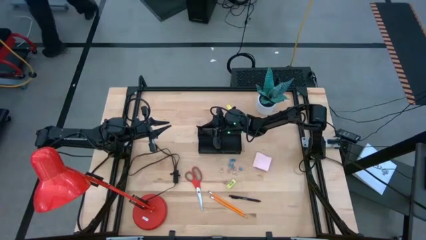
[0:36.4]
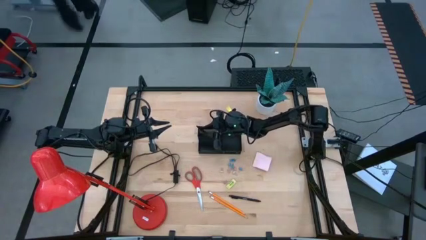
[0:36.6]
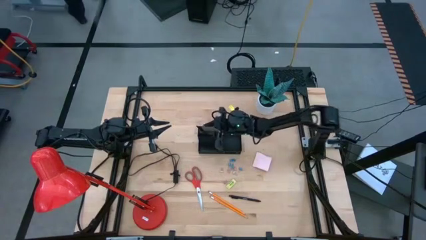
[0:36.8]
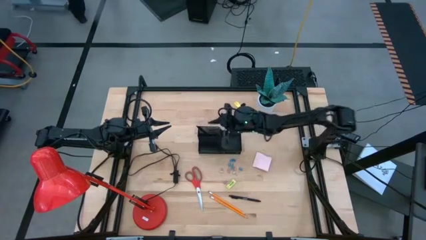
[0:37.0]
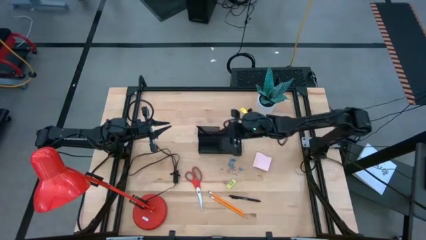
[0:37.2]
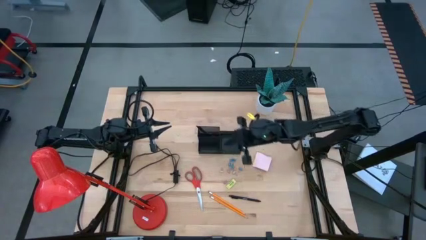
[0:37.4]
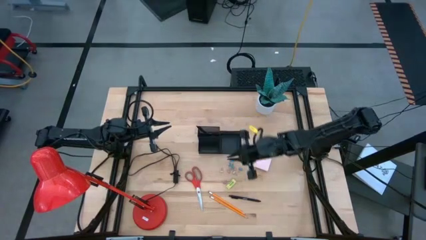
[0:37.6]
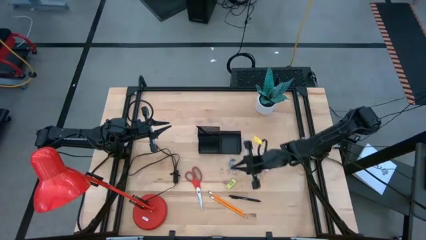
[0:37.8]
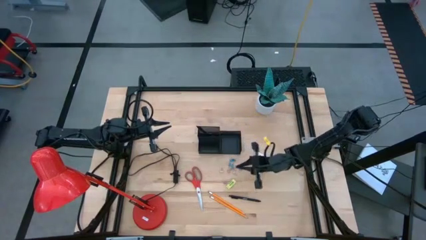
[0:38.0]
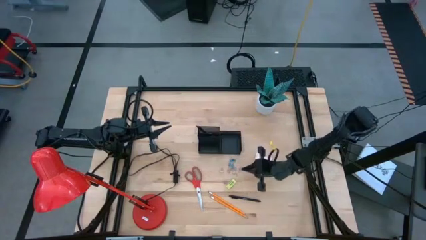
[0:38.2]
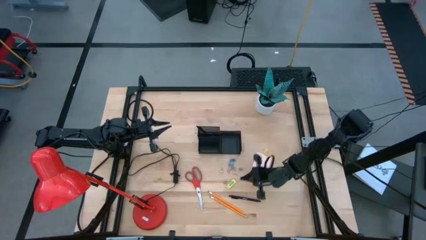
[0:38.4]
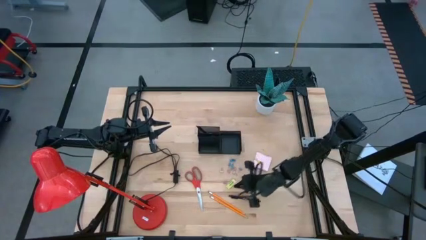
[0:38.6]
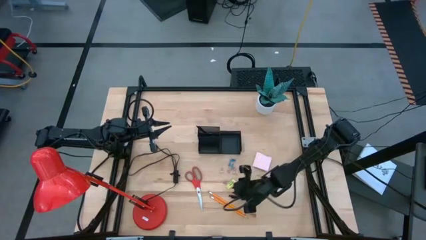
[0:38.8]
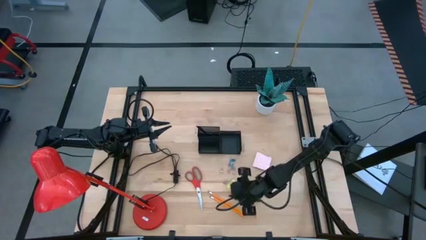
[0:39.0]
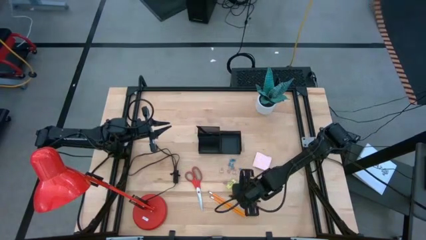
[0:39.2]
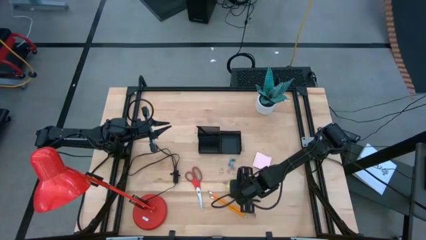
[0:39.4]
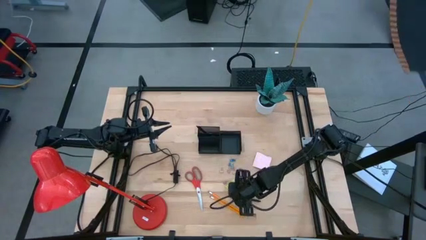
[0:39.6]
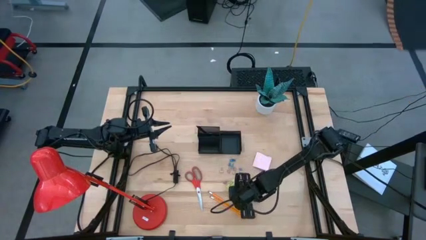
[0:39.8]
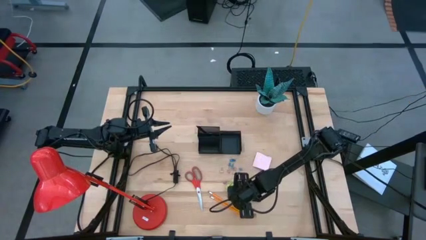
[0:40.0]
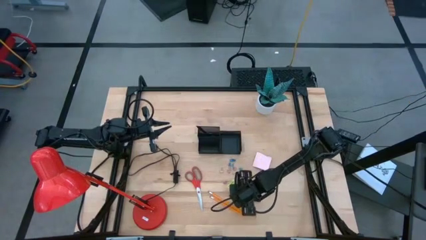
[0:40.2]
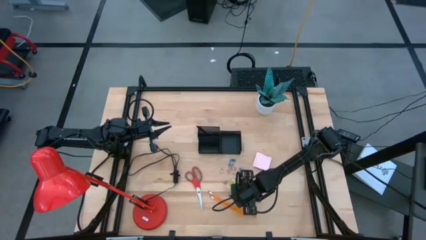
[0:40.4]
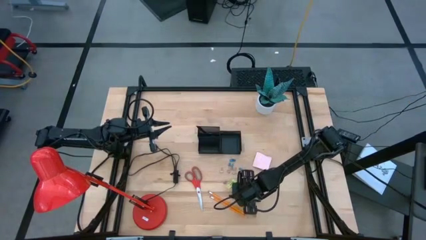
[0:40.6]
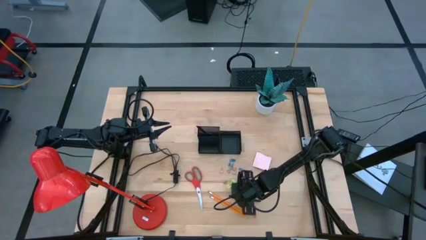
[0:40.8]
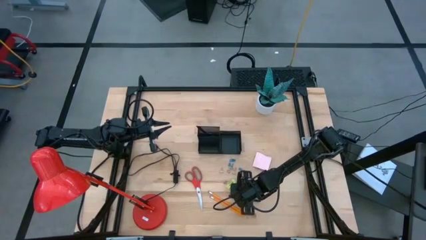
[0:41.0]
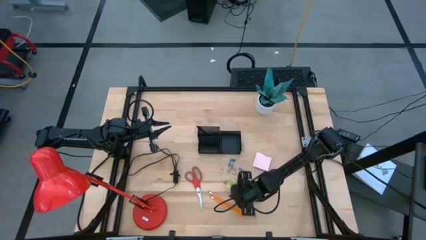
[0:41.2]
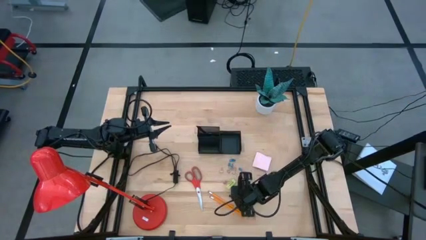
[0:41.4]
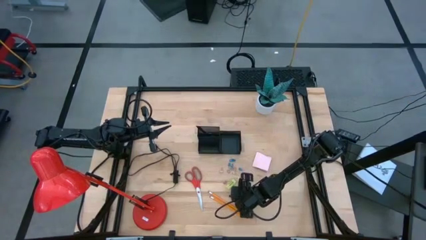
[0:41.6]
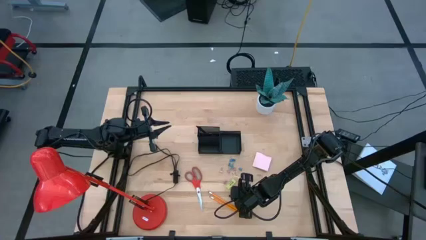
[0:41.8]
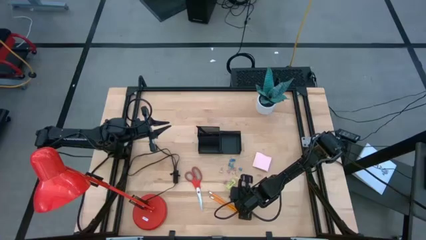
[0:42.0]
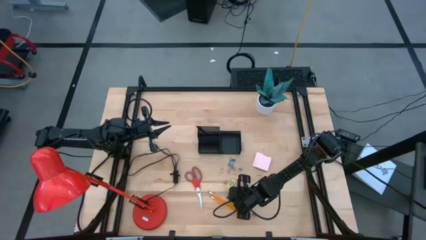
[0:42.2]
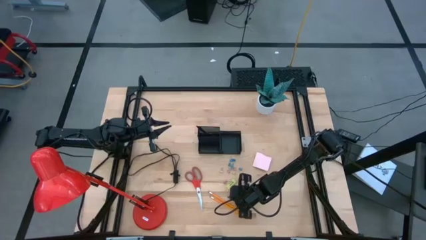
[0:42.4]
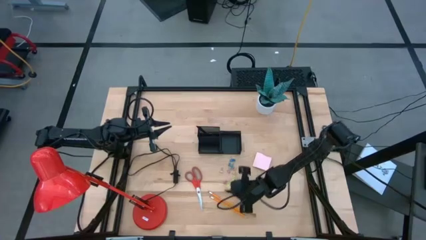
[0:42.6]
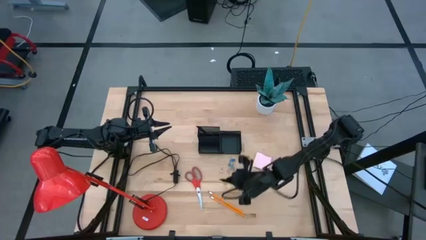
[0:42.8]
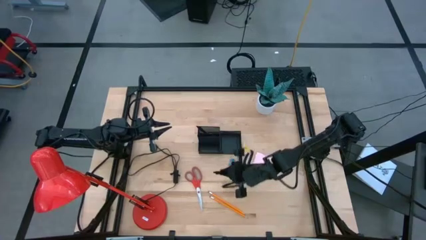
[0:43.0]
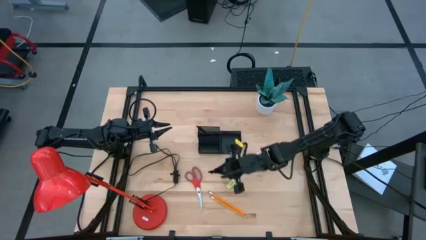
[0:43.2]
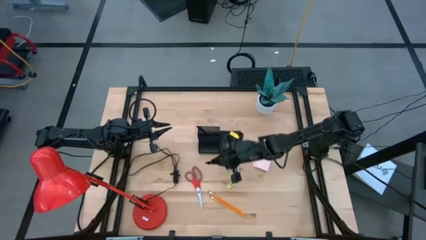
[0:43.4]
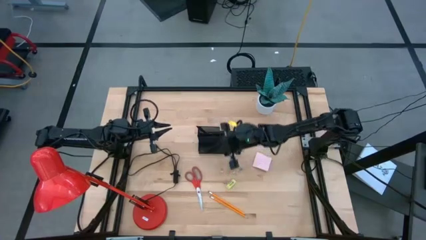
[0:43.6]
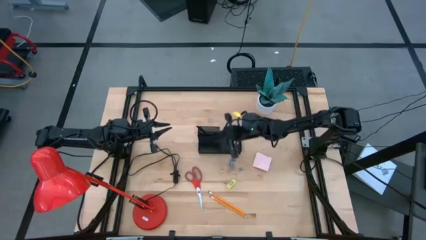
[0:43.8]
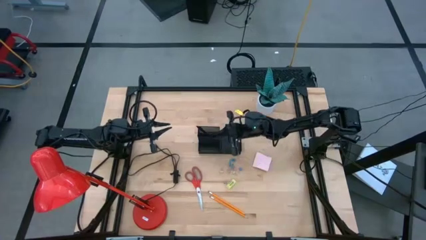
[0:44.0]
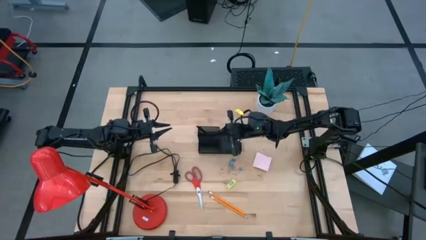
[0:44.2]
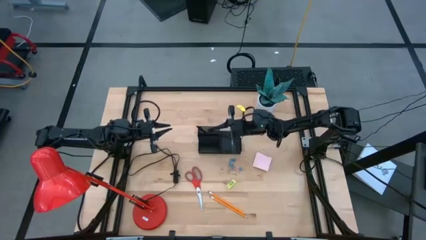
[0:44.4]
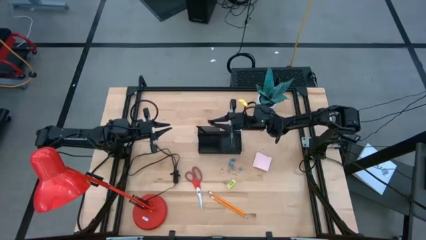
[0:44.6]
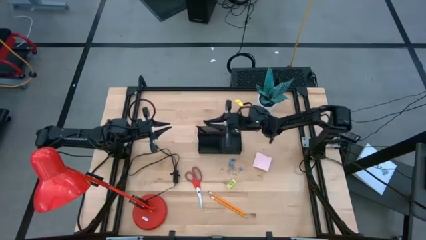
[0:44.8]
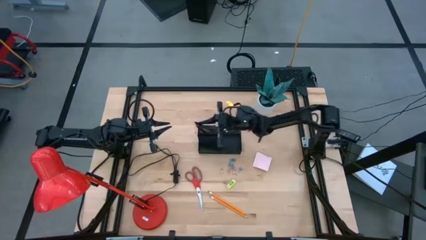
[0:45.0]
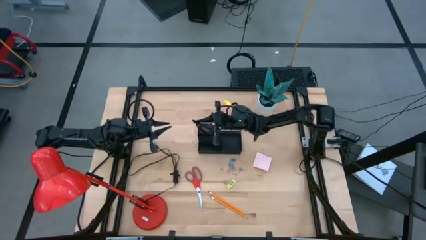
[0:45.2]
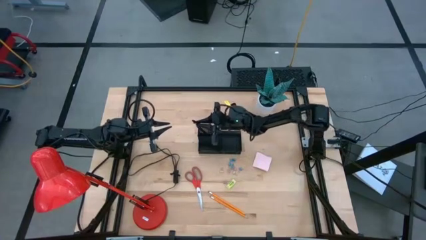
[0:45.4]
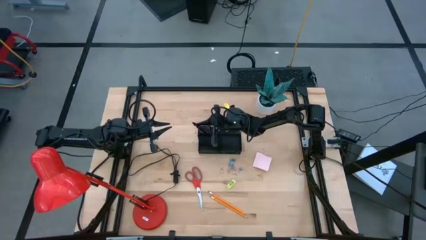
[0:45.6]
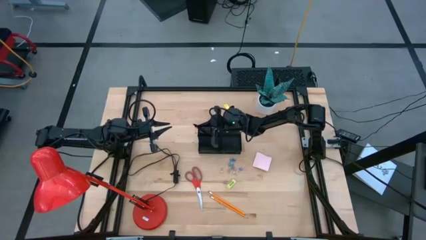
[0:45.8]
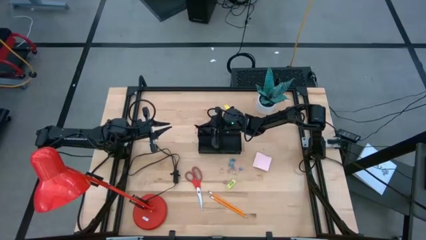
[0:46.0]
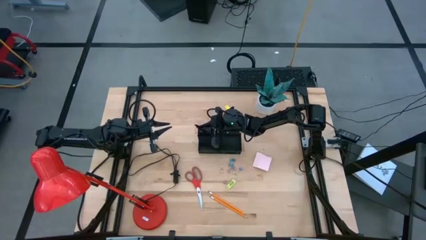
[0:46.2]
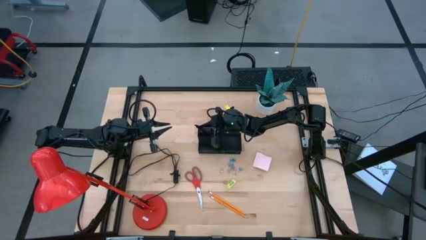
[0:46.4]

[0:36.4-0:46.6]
Task: Pick and place office supplies into organizer
Put the black pen into the black desk organizer

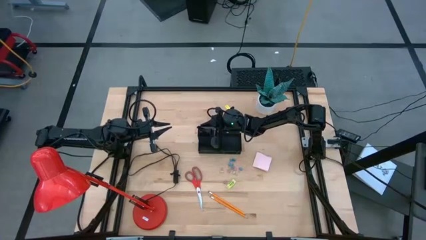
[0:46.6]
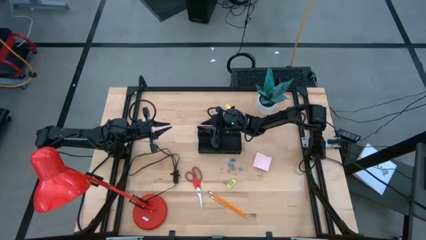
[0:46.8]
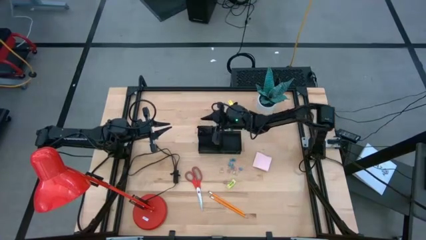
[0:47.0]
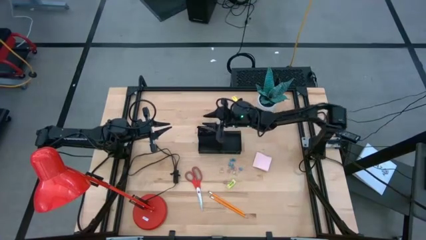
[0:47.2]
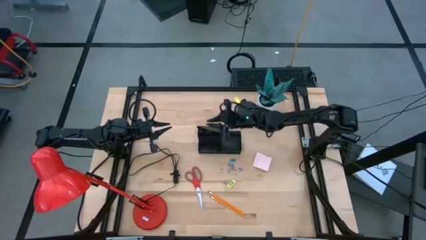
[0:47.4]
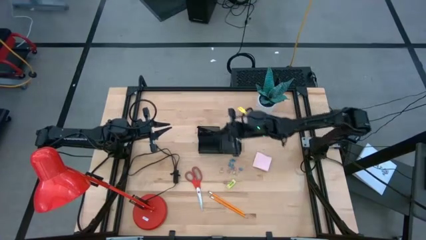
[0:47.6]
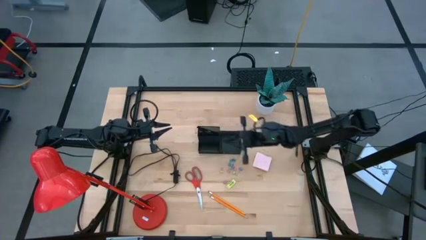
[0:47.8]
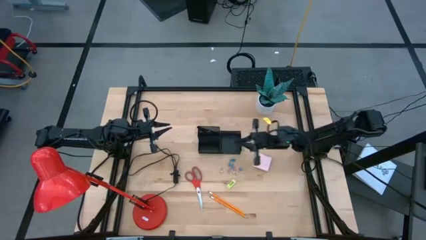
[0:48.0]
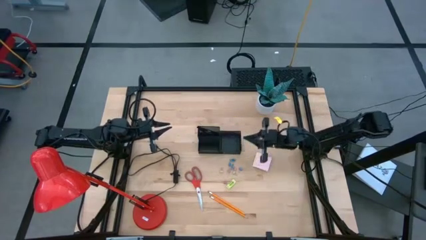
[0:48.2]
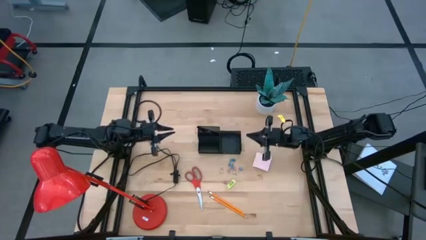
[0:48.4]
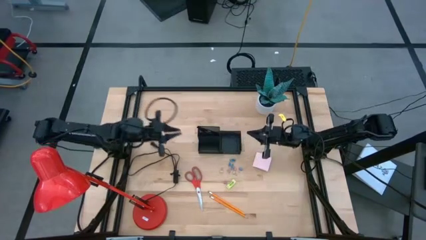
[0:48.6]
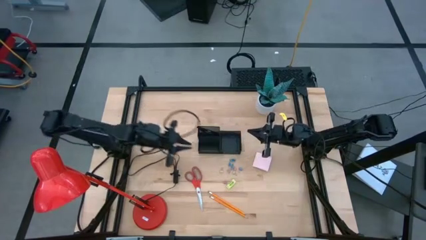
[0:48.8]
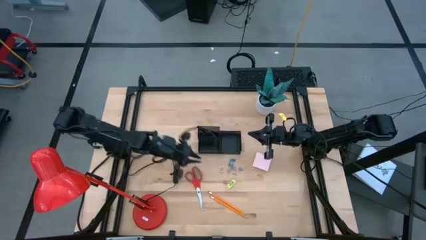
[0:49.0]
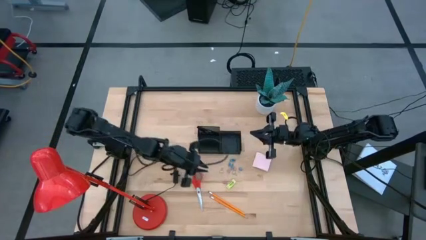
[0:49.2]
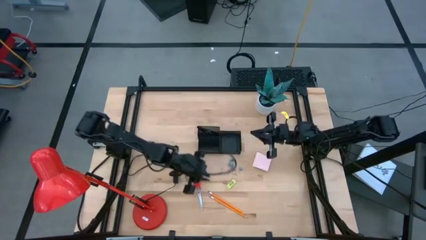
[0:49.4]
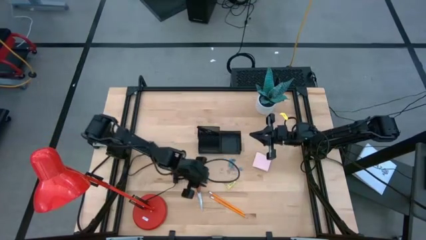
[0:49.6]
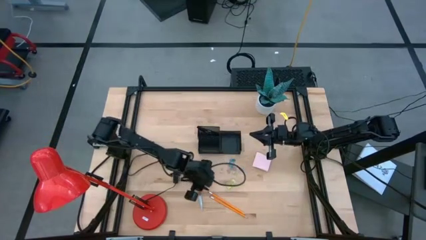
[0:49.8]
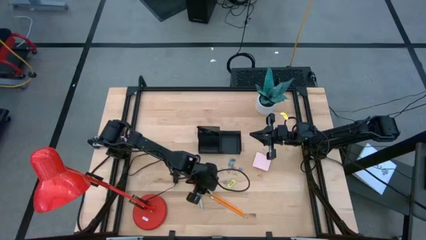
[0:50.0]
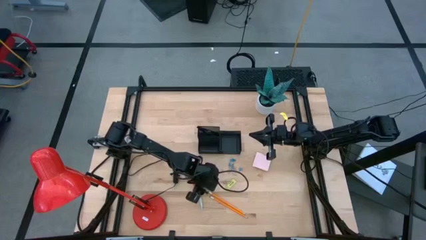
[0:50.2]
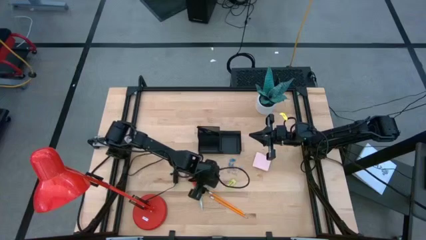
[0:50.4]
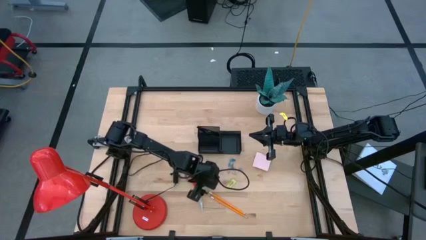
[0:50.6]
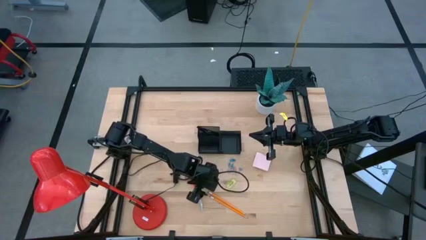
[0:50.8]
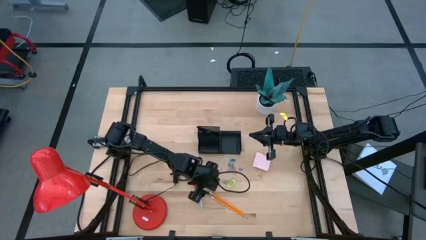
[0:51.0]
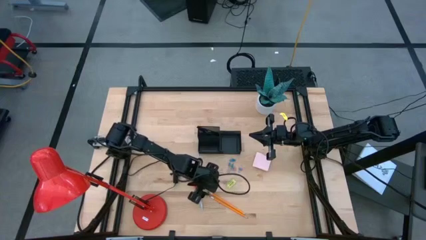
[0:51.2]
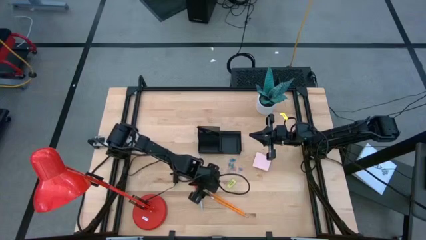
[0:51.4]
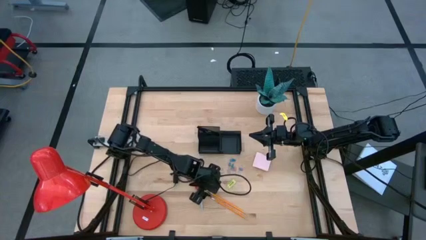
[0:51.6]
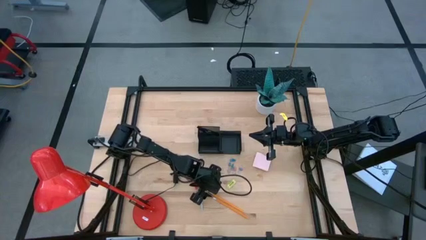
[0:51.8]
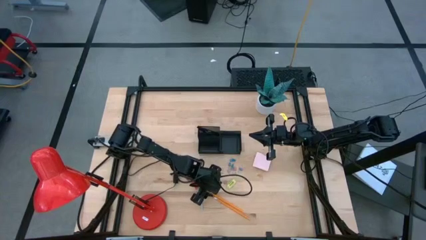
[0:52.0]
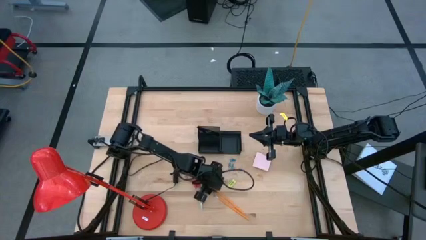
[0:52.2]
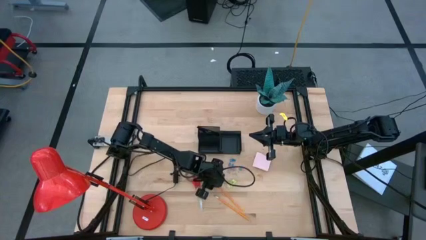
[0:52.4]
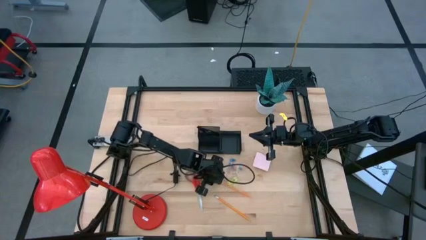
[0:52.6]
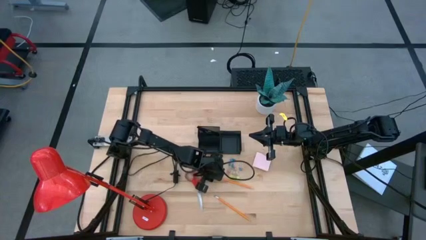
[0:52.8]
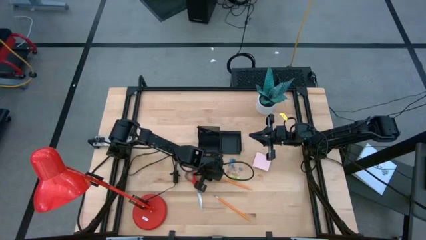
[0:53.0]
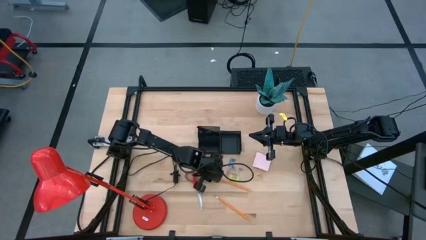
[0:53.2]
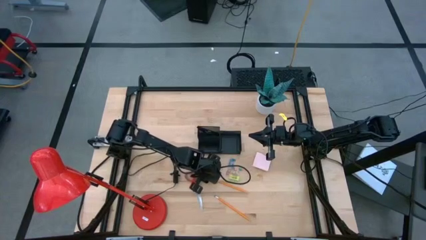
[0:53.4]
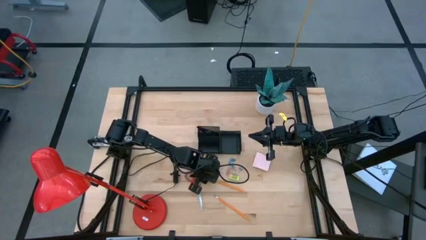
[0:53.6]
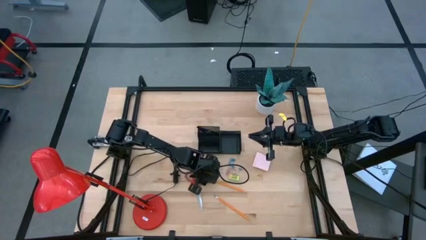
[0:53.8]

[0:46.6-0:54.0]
Put the orange pencil into the black desk organizer
